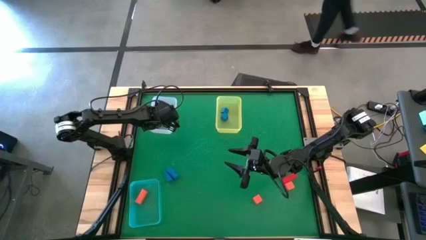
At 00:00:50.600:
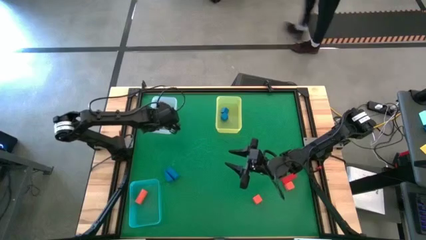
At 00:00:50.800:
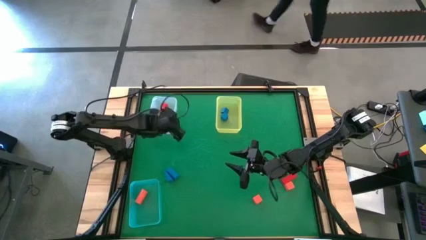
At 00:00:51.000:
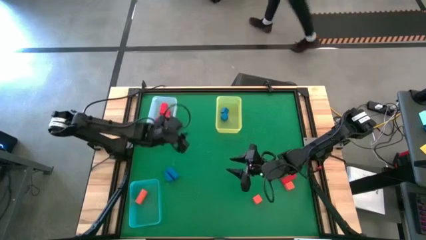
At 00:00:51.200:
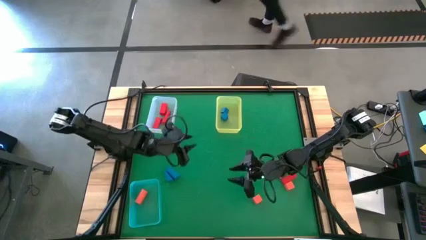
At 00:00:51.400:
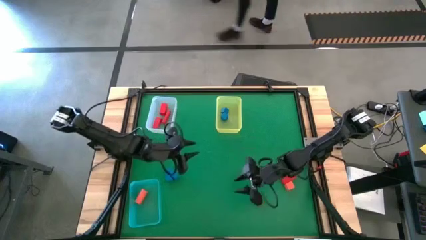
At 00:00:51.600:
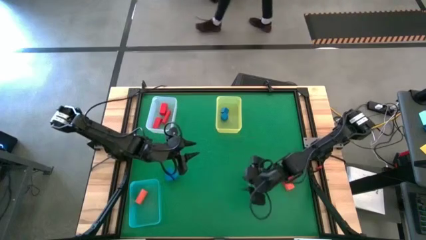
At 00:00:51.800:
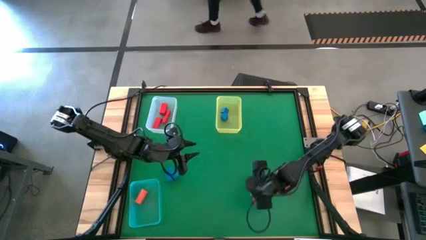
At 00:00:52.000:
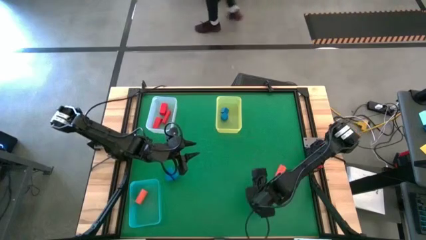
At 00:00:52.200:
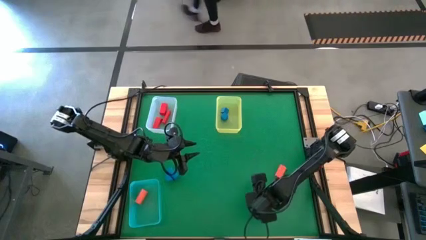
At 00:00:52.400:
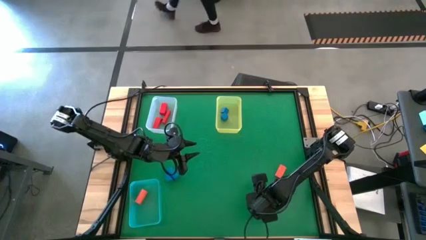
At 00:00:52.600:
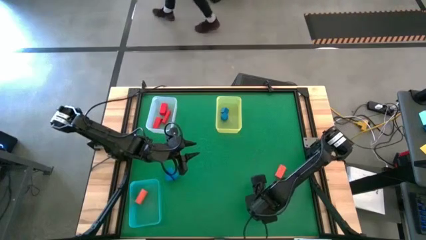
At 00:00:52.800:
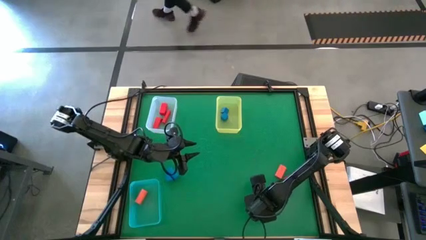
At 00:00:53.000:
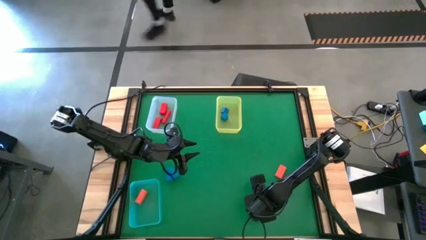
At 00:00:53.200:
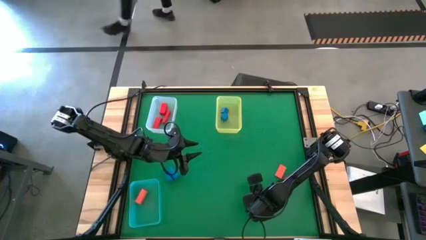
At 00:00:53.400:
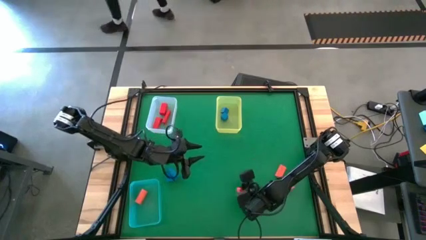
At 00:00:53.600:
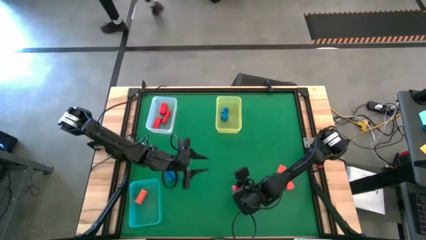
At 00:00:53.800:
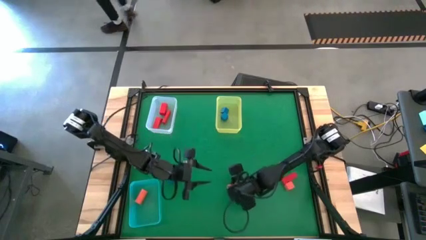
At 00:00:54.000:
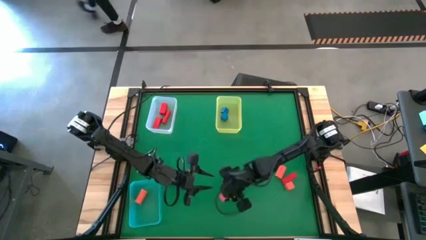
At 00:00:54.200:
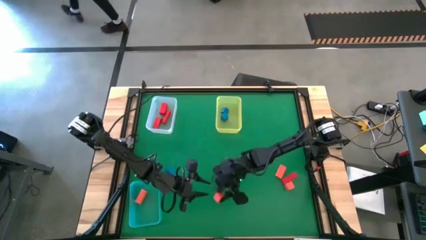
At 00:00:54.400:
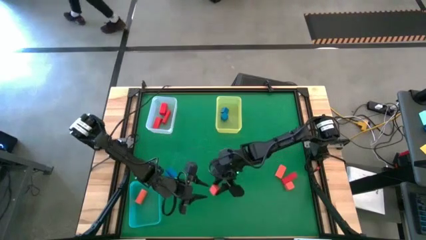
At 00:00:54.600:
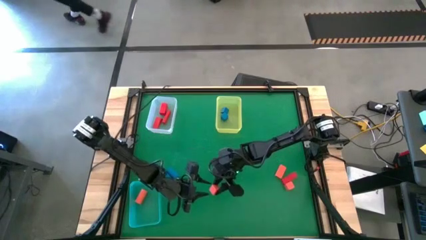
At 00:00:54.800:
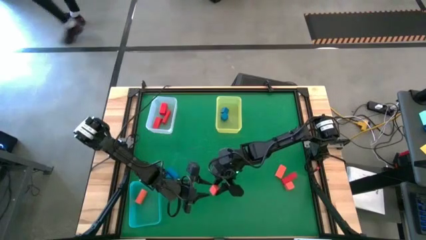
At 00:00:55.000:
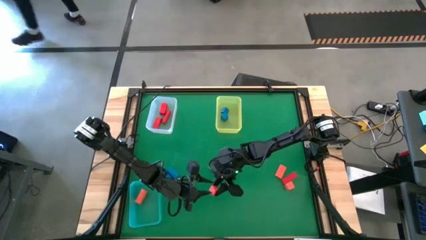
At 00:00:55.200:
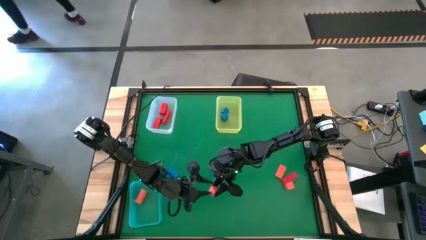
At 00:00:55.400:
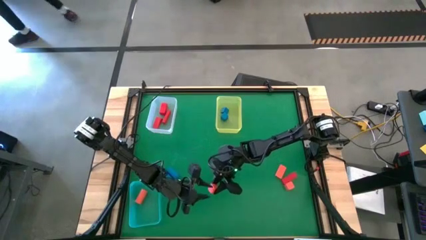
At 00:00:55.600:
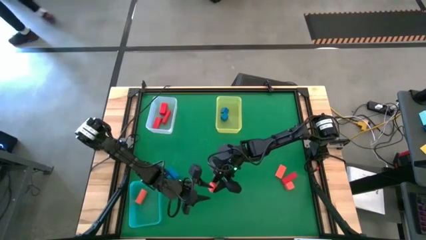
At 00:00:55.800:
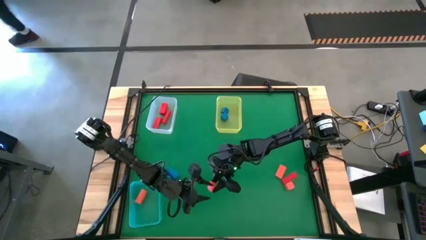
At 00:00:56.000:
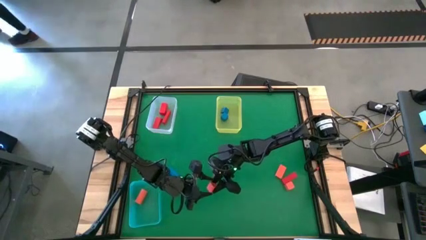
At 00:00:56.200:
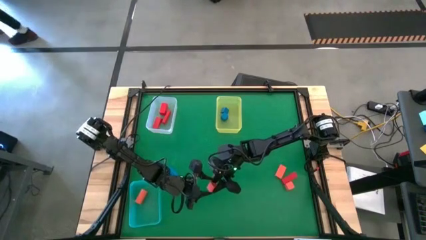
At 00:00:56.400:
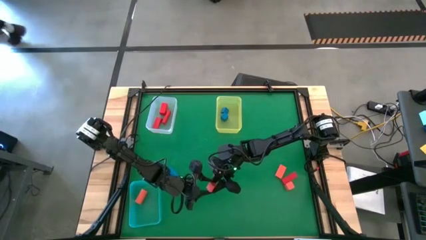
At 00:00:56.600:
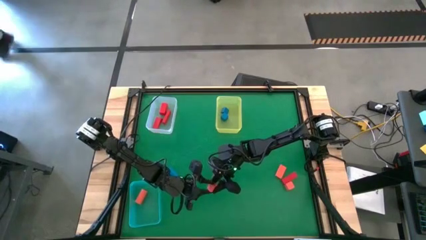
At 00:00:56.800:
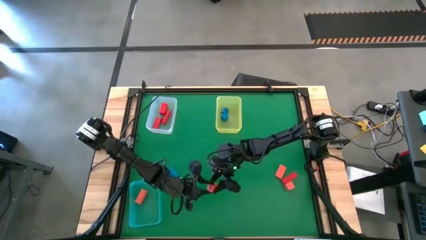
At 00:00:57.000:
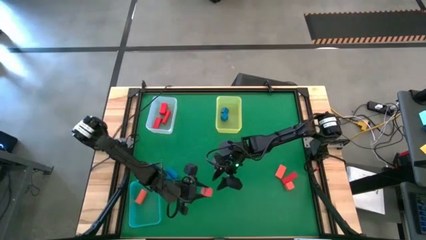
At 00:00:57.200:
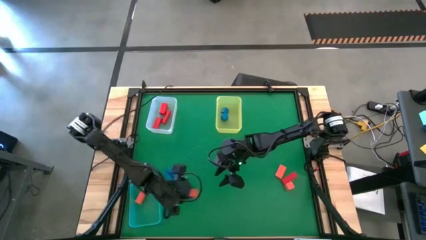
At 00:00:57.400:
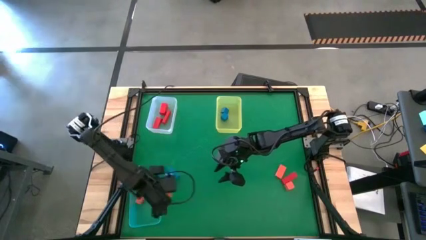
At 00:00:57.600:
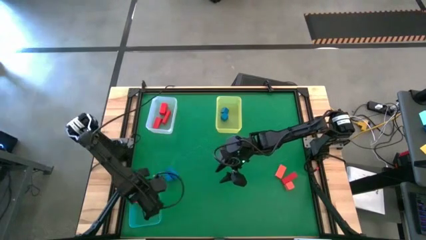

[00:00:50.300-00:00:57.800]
Task: Sort & place blocks by color
Put the orange block into the blue bin

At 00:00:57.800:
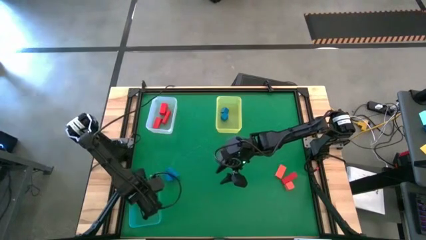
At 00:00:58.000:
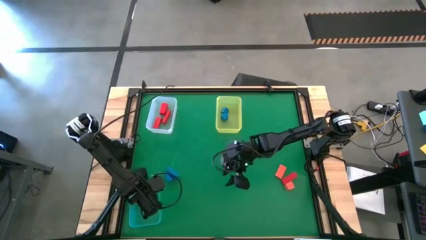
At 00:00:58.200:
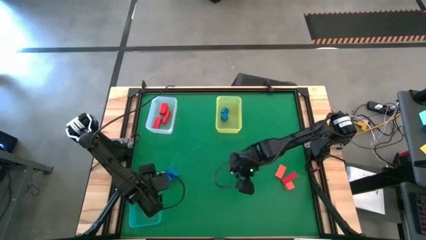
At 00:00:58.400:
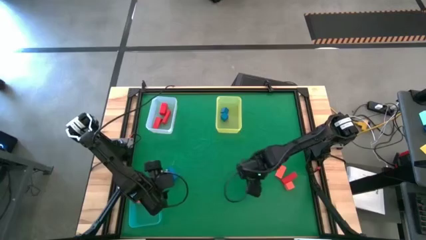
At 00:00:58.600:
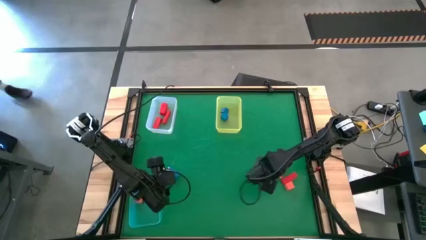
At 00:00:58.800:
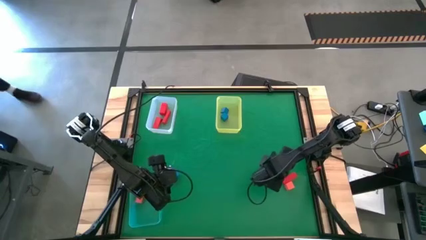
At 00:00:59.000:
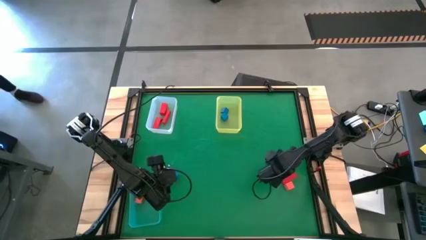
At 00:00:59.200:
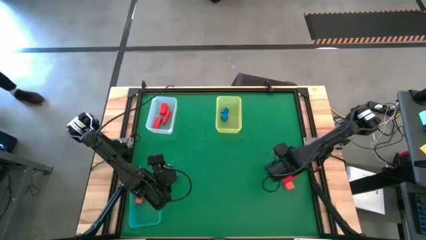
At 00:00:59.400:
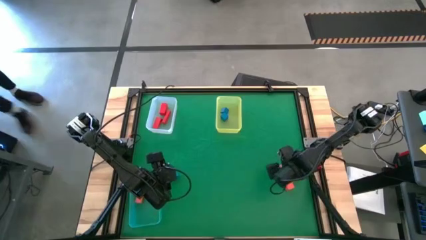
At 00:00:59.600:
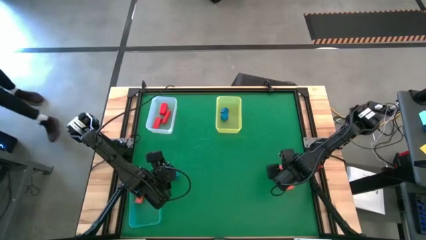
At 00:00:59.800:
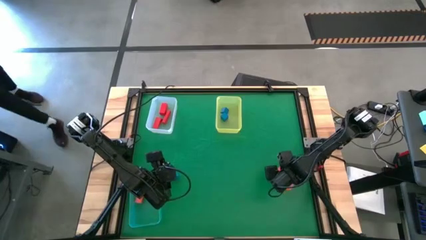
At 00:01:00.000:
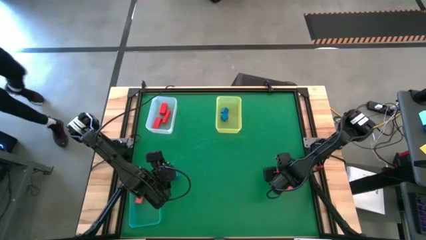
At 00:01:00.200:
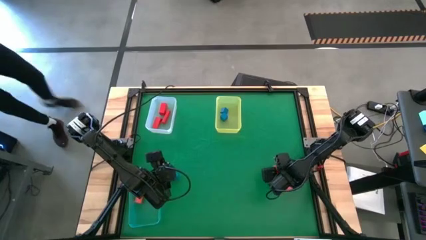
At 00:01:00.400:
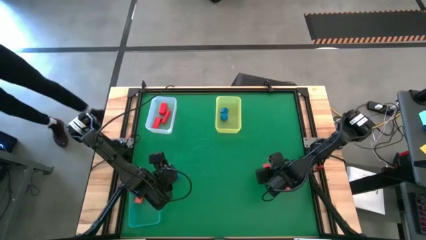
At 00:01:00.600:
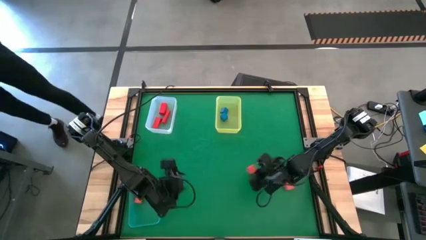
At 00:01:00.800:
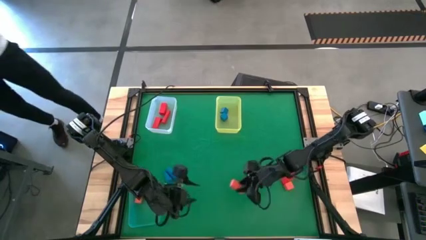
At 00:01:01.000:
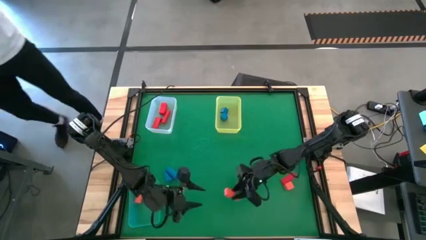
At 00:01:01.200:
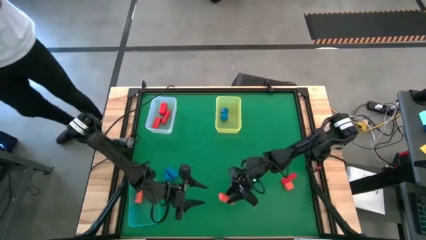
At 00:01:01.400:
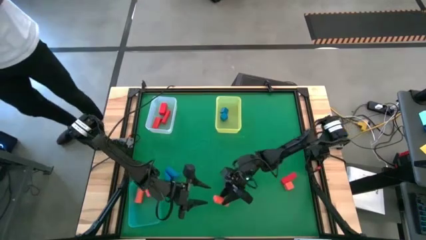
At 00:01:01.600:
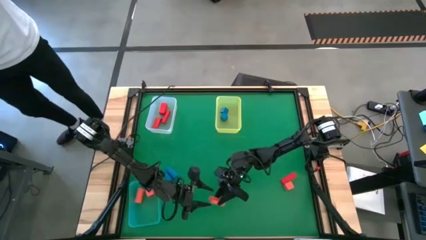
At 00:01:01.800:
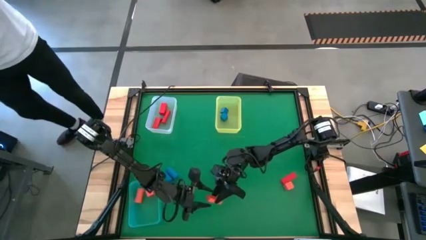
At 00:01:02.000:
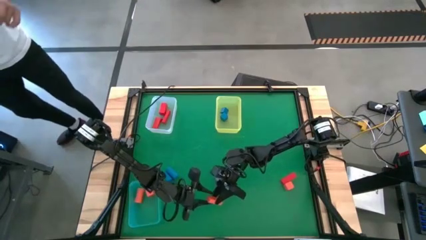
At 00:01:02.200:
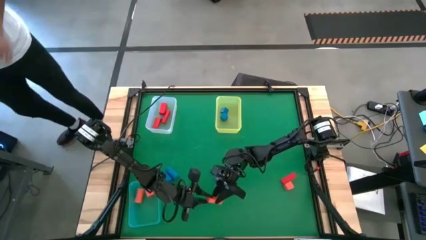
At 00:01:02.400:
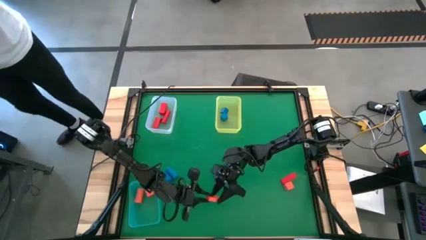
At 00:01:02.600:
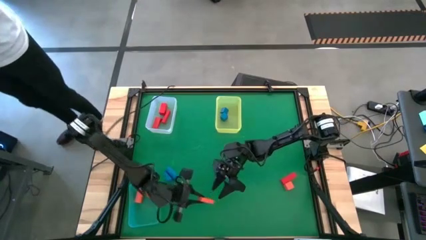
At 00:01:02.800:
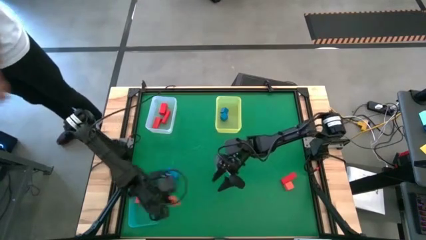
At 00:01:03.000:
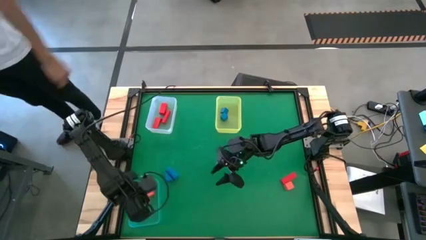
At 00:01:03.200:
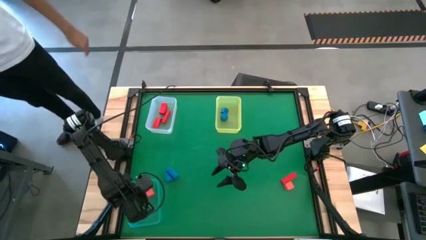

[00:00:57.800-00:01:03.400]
Put the orange block into the blue bin

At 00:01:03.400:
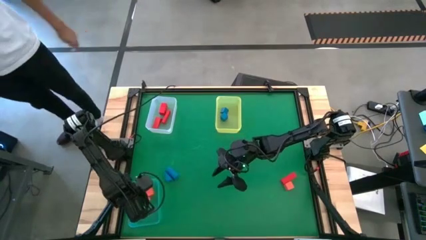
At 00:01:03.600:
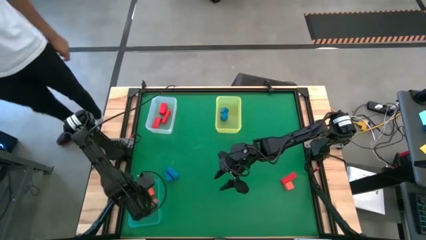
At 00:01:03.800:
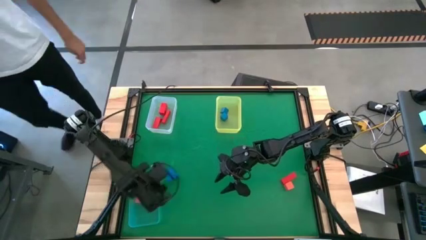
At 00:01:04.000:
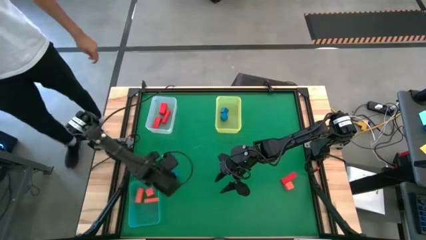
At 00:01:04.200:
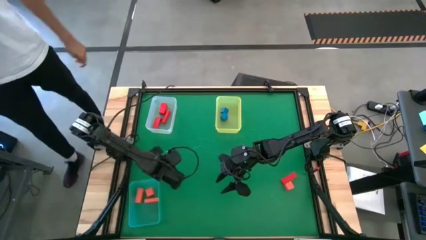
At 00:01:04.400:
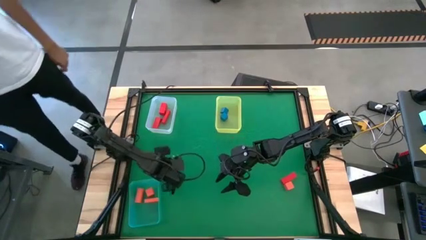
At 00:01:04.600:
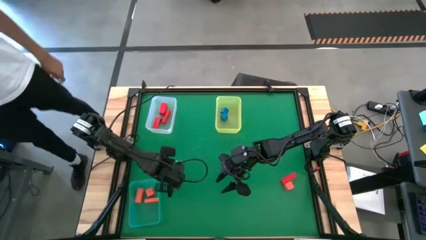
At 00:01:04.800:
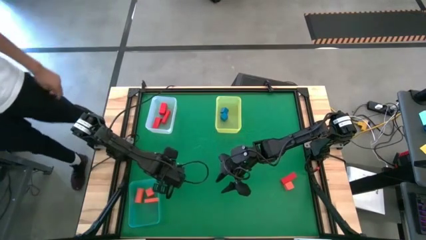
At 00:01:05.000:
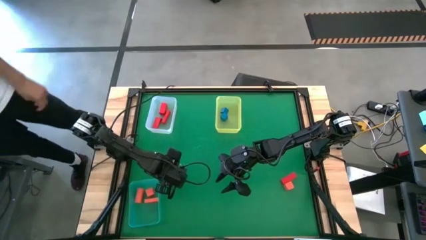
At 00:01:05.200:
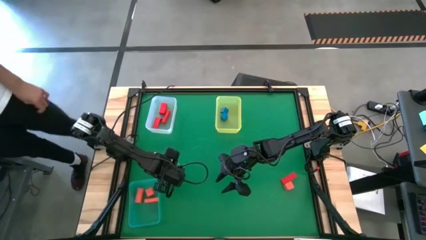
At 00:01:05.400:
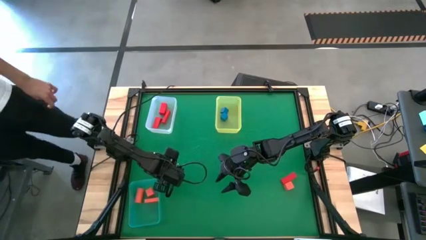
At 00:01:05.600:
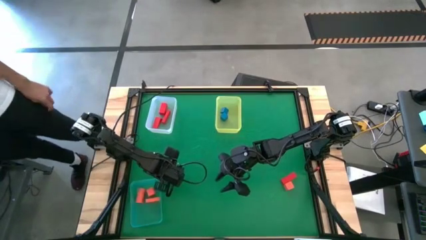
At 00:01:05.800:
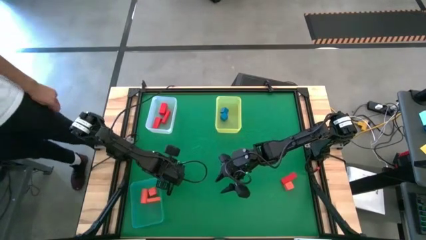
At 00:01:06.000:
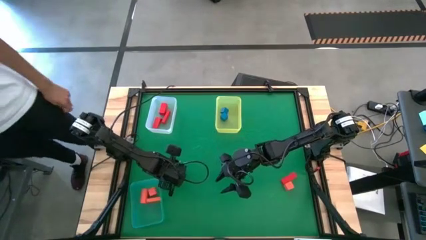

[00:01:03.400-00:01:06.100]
Put the blue block into the yellow bin
